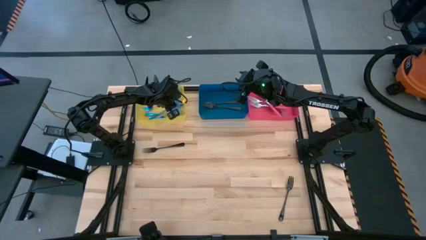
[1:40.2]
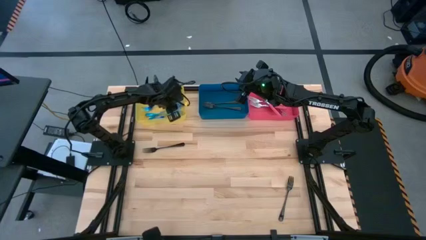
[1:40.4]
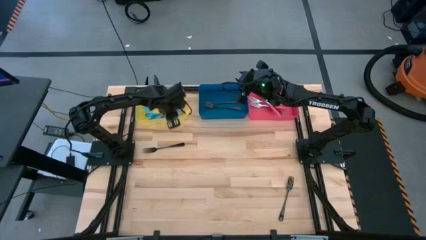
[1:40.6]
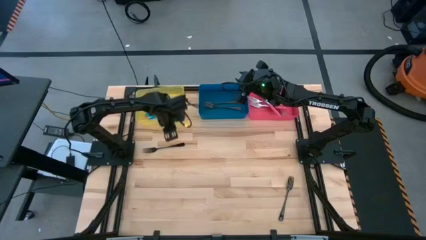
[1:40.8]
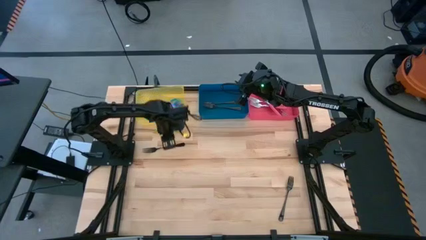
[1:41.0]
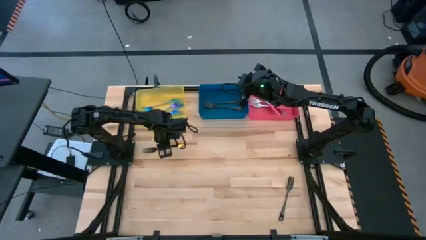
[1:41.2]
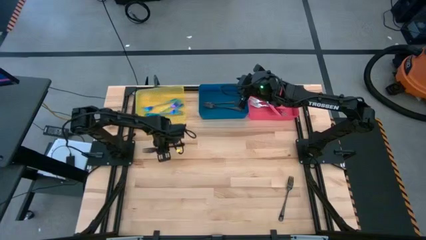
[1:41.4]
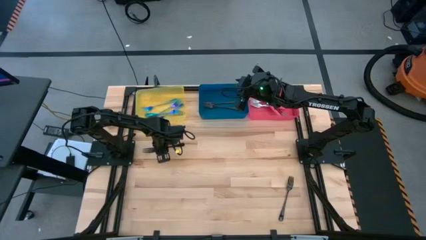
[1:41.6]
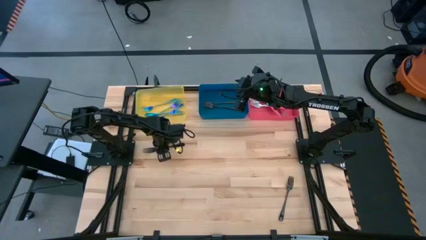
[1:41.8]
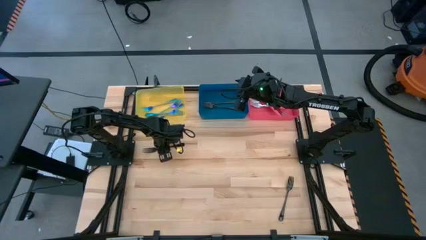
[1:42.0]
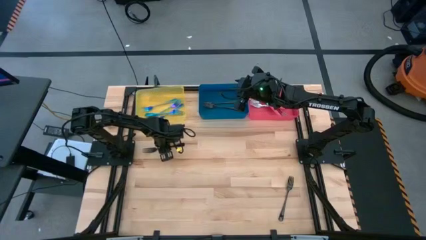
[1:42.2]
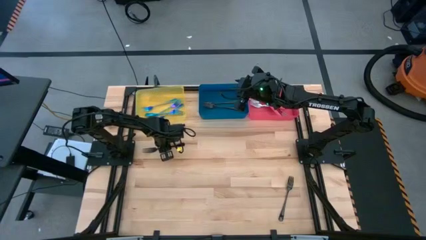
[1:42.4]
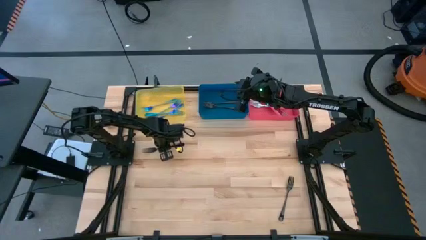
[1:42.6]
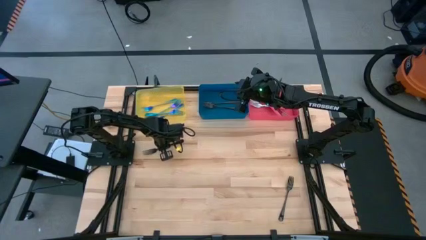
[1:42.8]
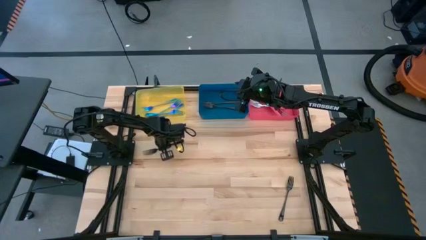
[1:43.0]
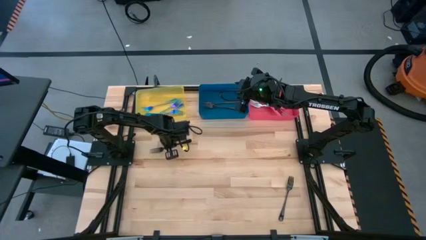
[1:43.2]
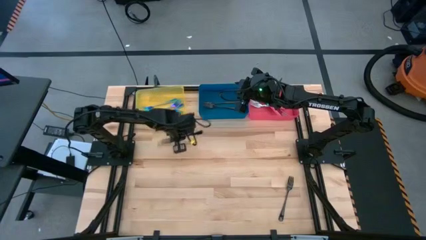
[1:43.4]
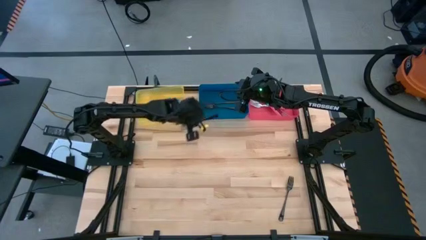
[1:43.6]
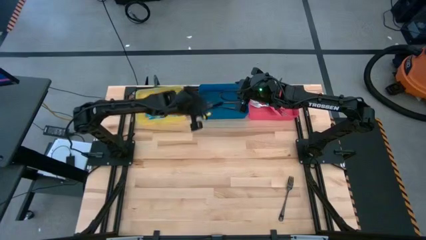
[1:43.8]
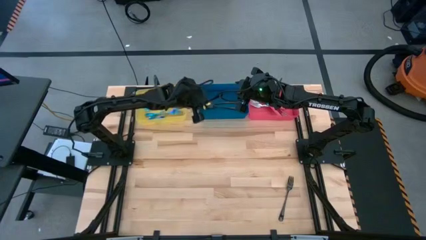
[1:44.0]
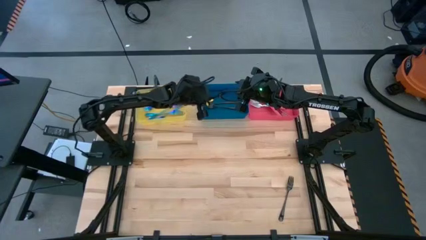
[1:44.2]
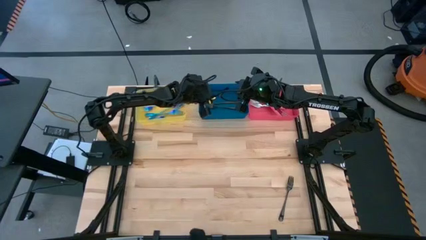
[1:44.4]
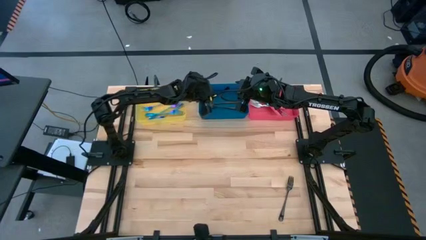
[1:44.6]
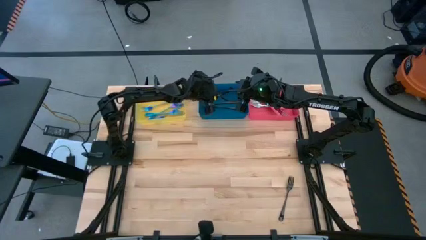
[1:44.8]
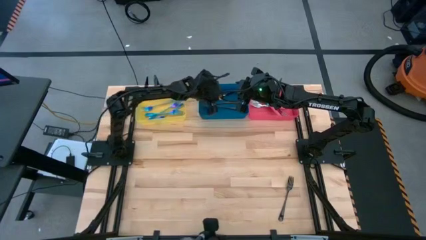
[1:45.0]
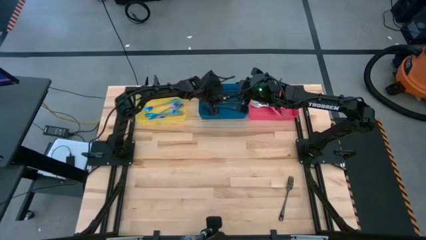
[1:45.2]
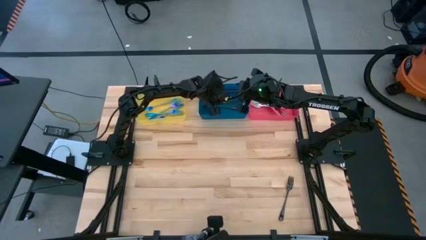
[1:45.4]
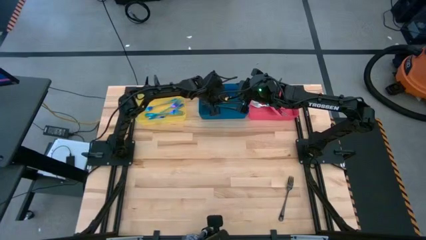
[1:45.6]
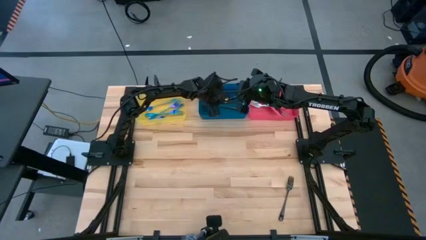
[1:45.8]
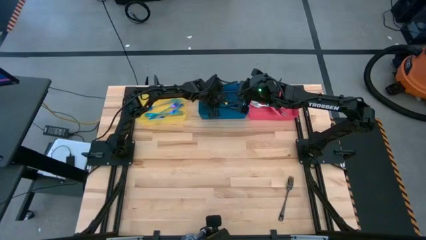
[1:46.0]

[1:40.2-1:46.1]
Task: Sort silverware by color (type)
Put the black fork into the blue bin

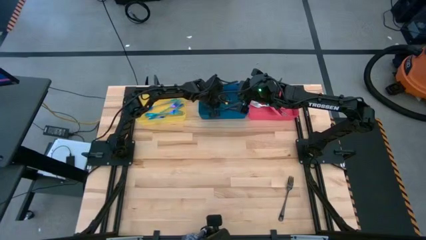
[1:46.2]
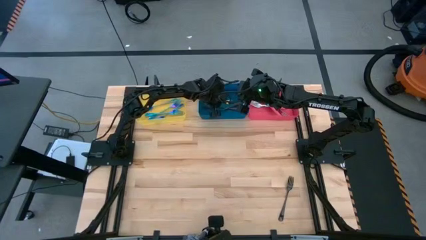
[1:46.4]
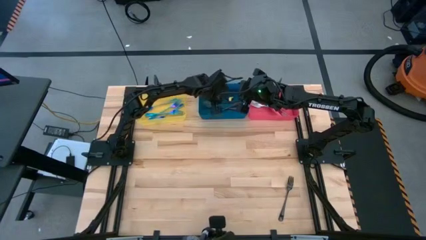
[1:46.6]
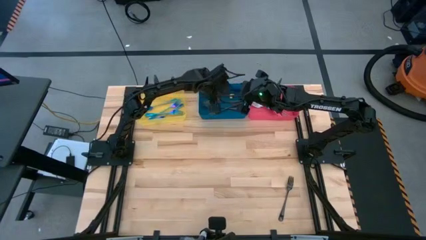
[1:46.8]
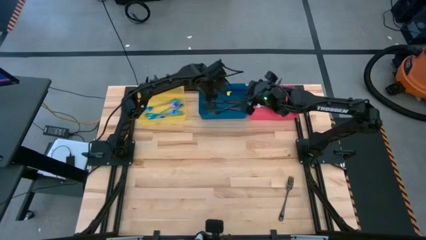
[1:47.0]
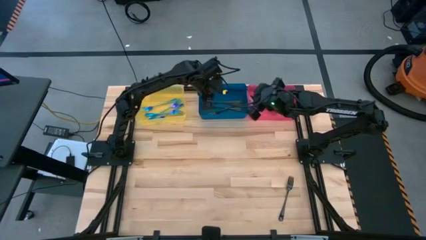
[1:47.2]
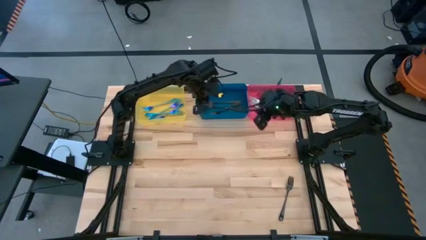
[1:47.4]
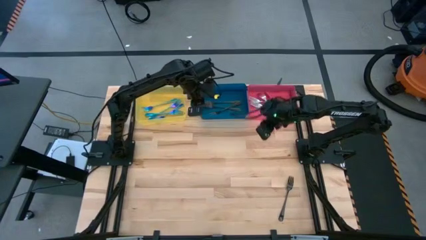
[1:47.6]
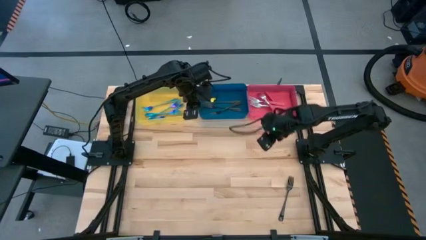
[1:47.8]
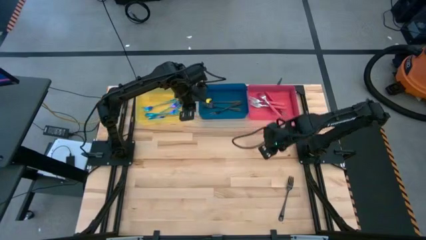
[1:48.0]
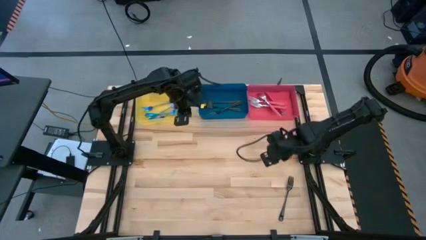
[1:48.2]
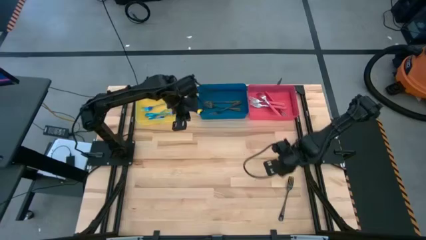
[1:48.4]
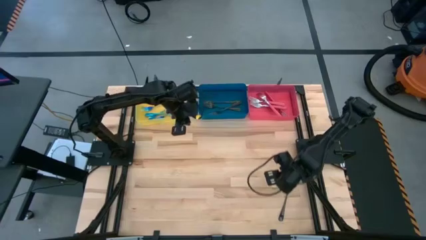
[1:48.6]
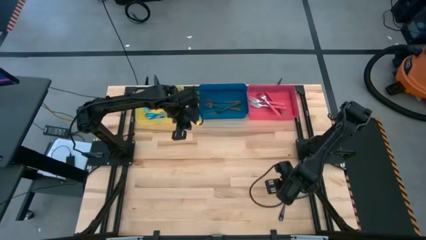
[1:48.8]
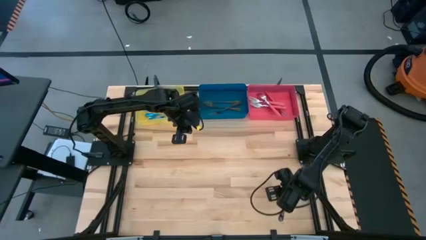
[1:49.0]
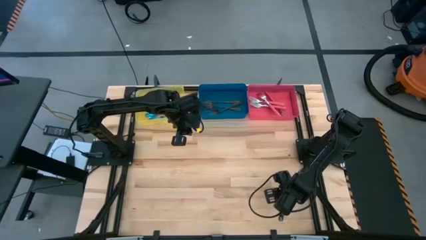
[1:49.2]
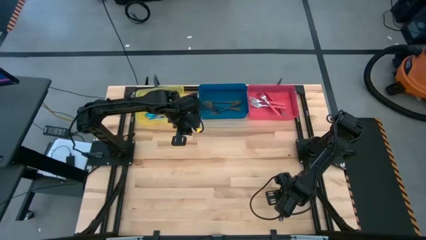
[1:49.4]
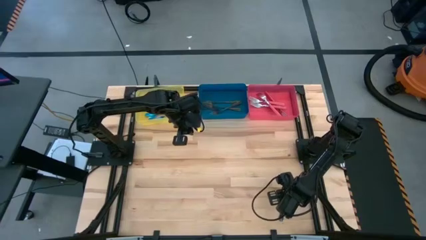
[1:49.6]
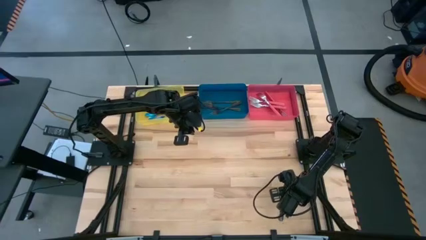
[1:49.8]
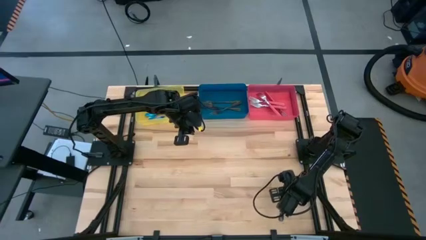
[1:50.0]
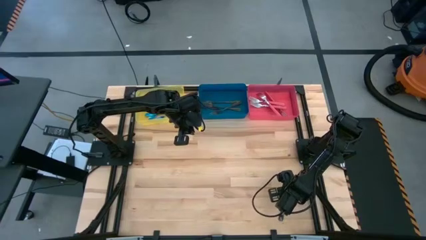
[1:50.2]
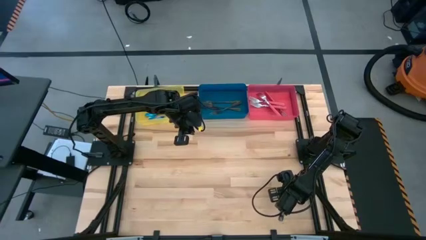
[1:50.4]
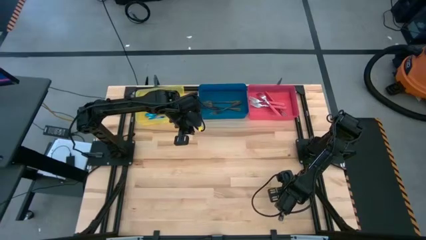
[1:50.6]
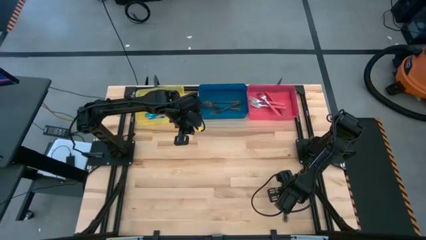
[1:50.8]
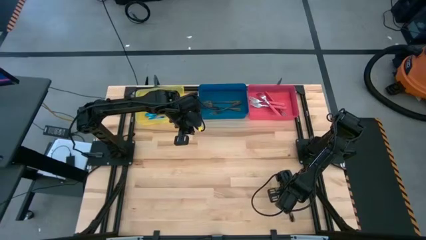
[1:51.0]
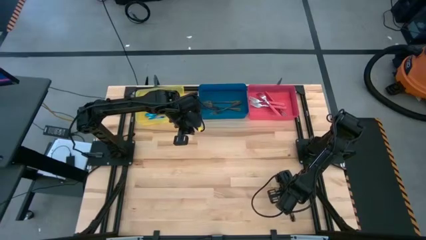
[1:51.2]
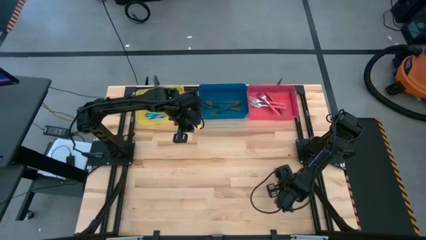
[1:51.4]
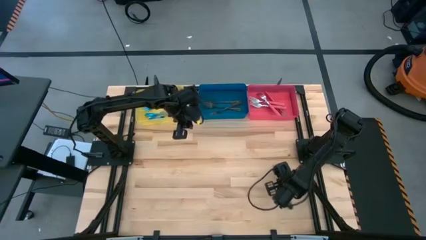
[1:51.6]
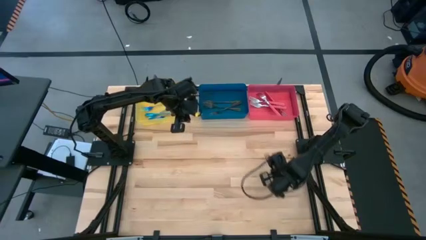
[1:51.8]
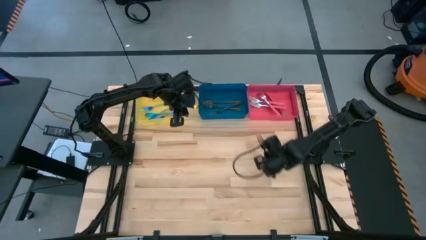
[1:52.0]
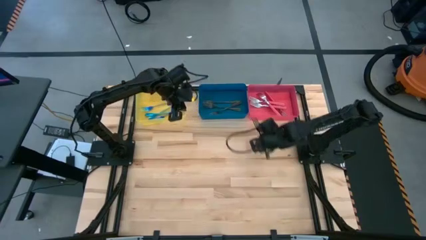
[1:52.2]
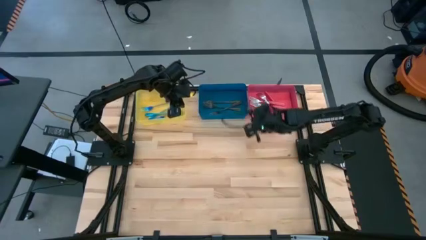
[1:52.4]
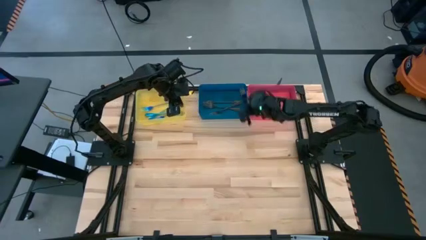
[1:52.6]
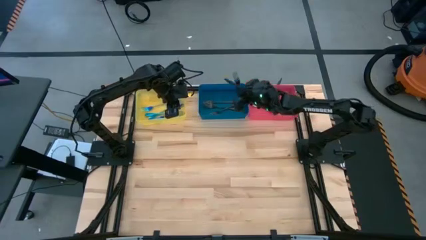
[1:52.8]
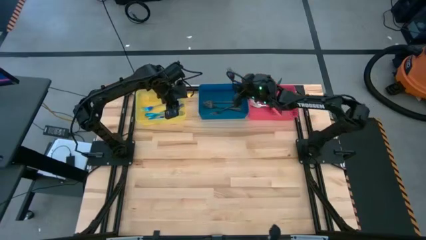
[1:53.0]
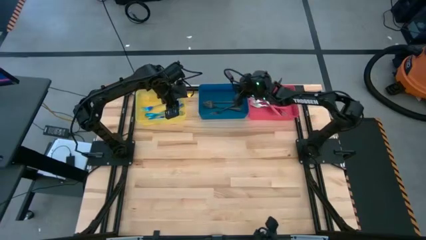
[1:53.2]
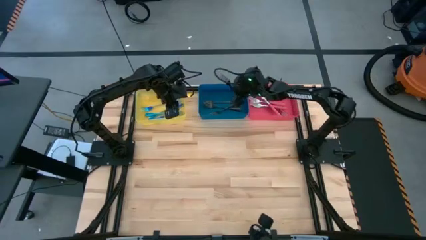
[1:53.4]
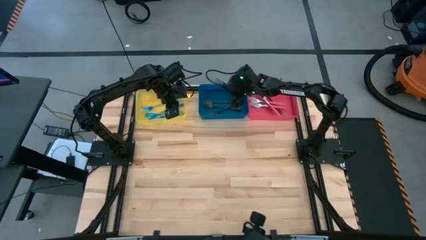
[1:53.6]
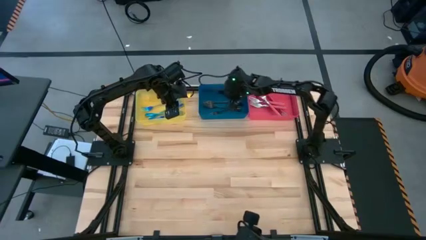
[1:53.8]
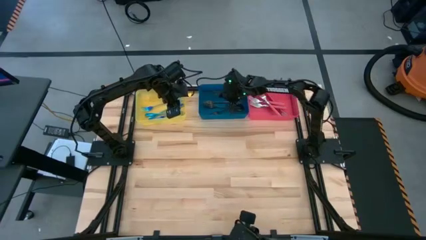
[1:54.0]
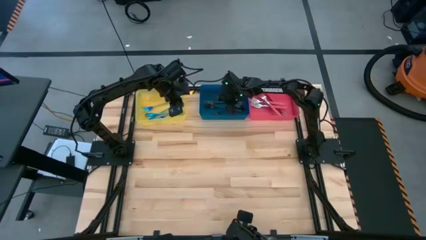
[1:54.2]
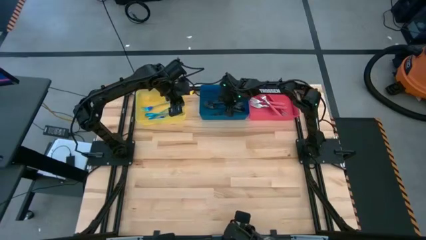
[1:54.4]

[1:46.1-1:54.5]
Put the black fork into the blue bin

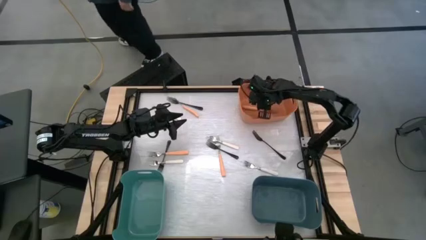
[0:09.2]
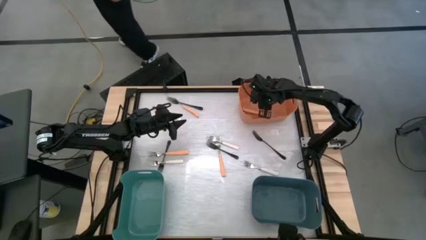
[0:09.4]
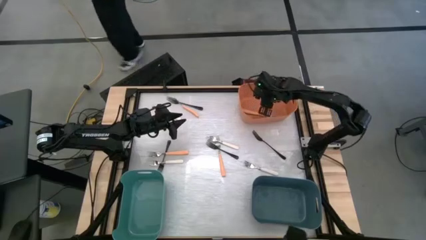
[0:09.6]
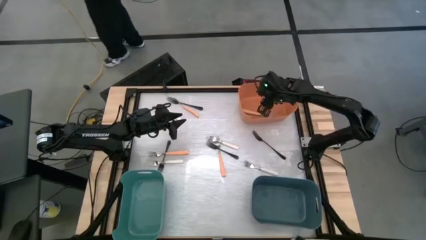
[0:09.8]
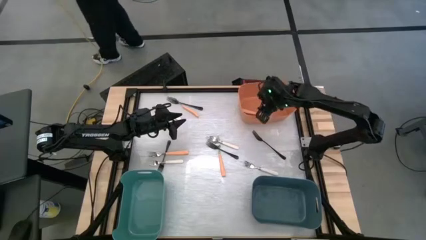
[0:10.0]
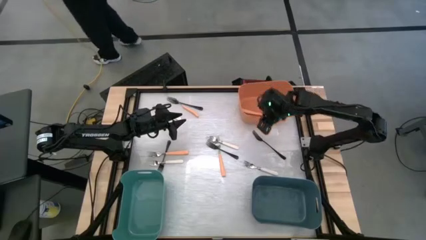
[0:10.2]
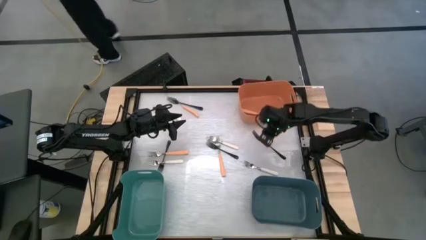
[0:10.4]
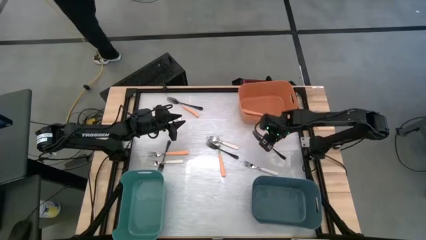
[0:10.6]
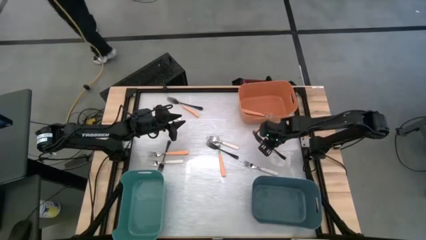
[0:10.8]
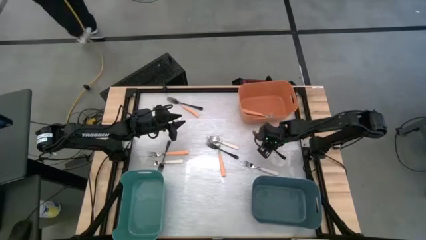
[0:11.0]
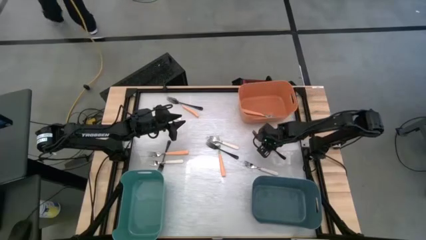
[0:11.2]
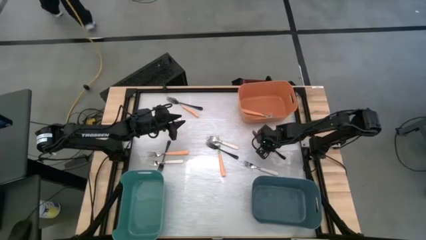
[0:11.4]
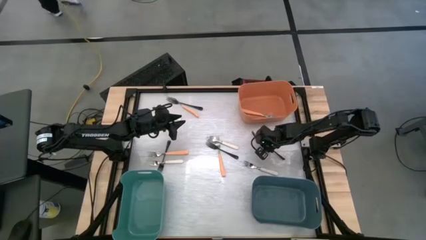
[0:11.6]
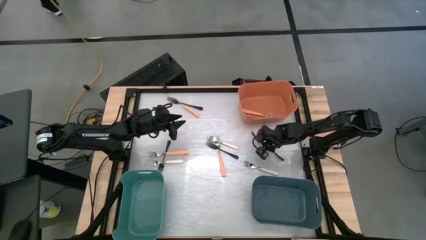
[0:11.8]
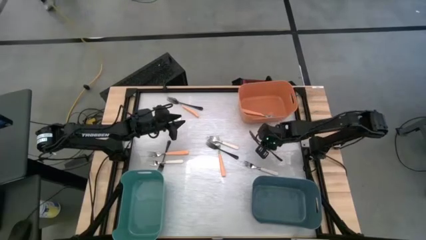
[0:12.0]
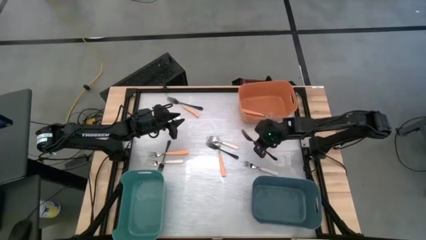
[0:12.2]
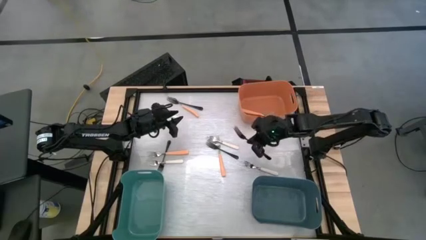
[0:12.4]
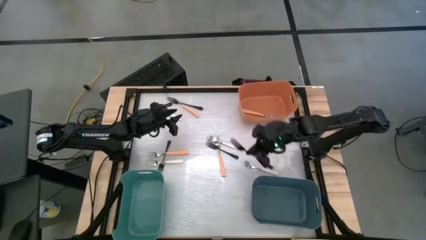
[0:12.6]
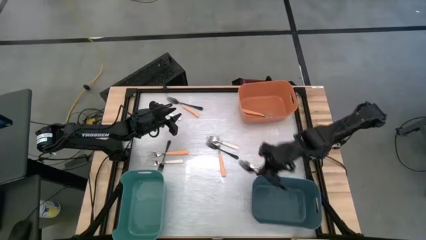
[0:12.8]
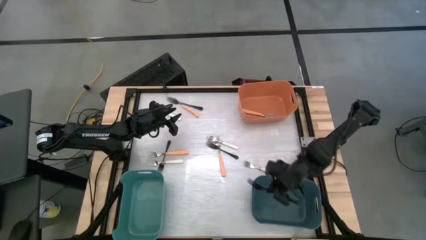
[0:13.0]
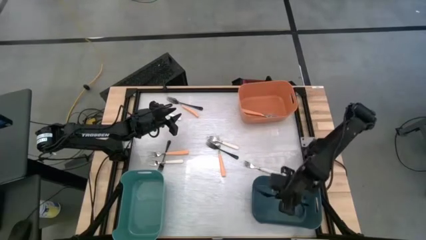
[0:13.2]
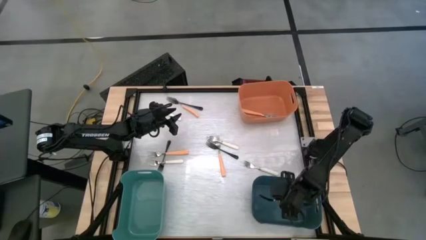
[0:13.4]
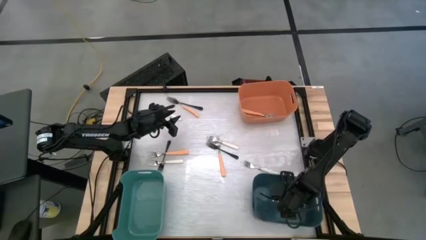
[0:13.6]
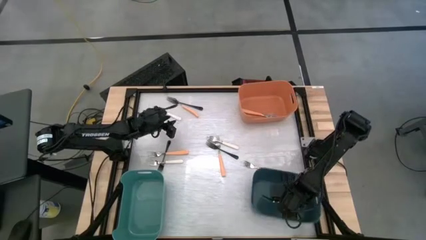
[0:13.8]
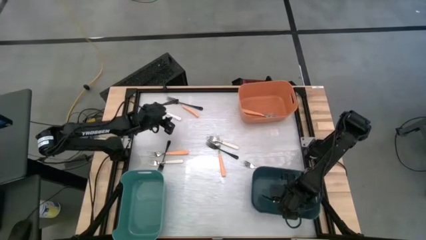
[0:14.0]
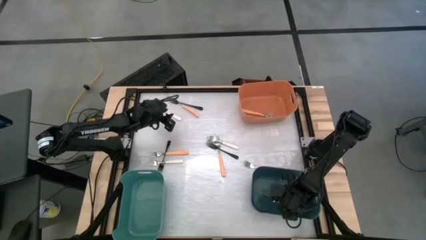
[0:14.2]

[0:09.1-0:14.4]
Task: Sort silverware by color (type)
Put the black fork into the blue bin
